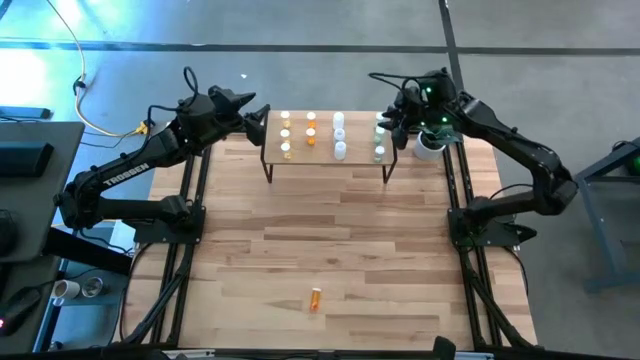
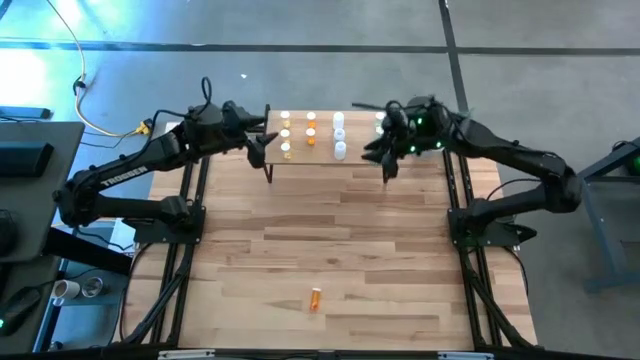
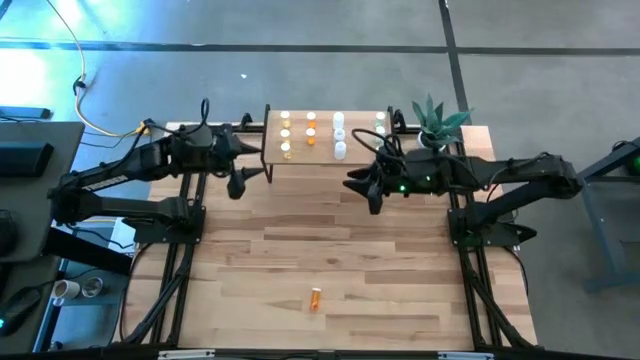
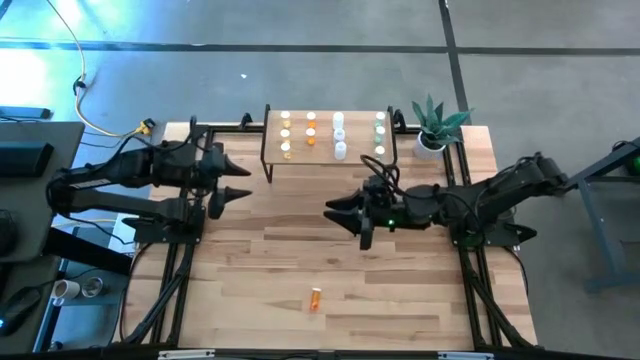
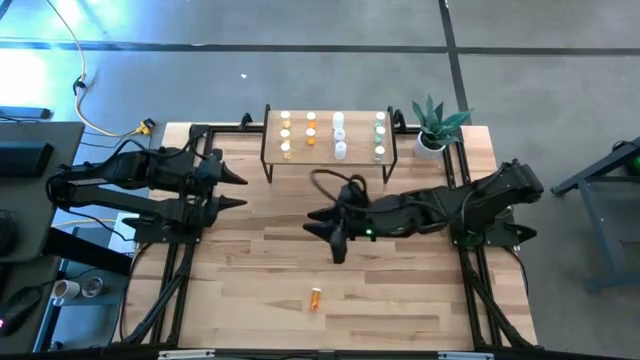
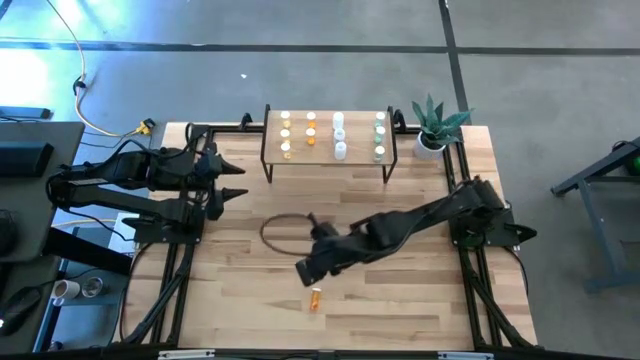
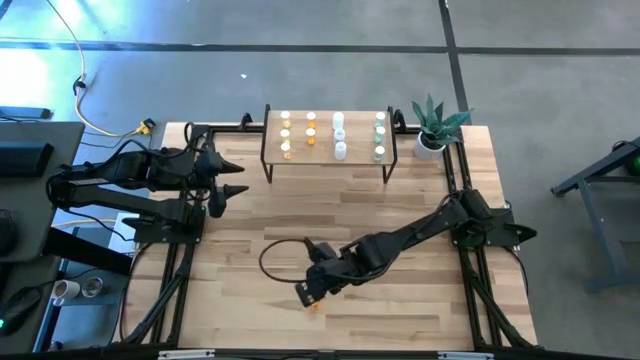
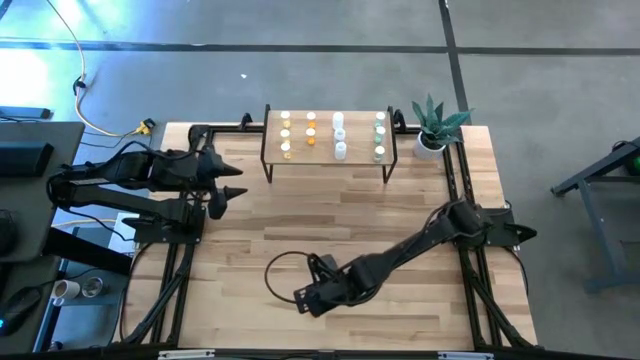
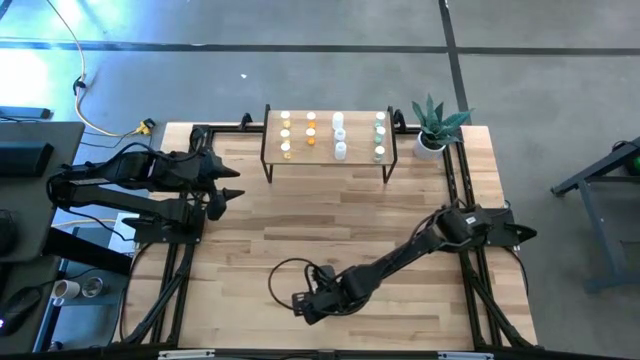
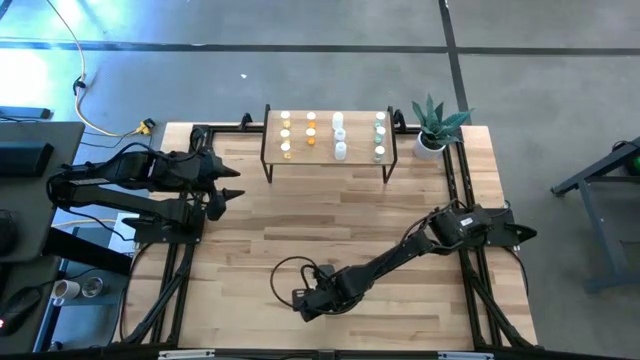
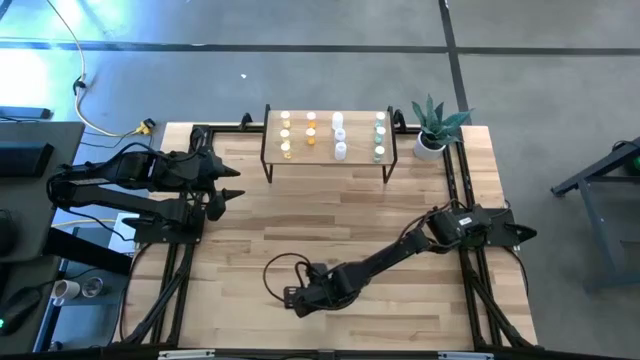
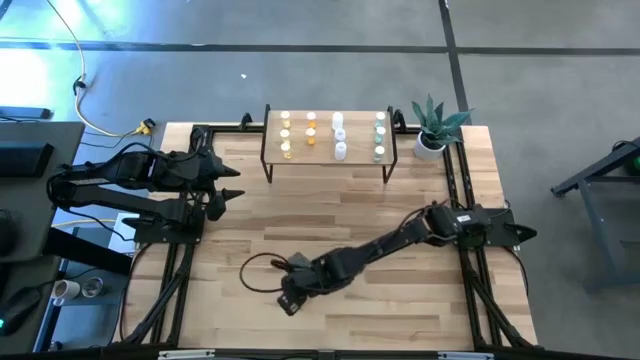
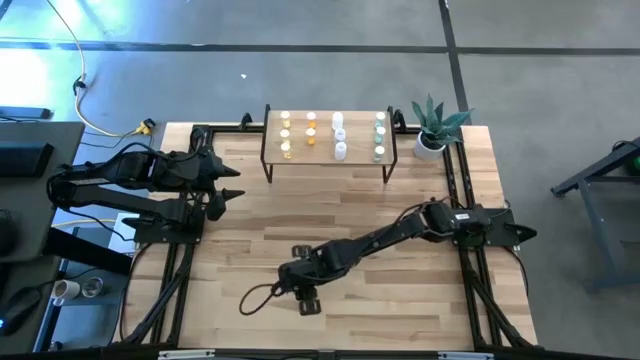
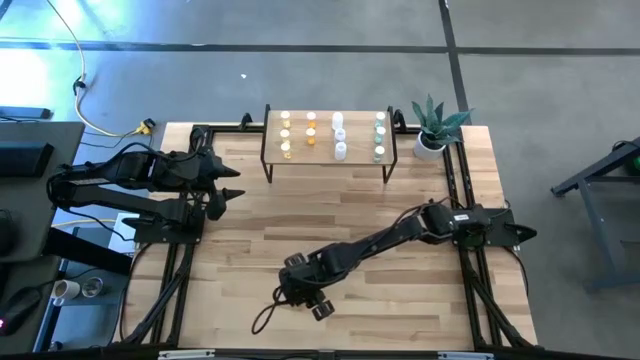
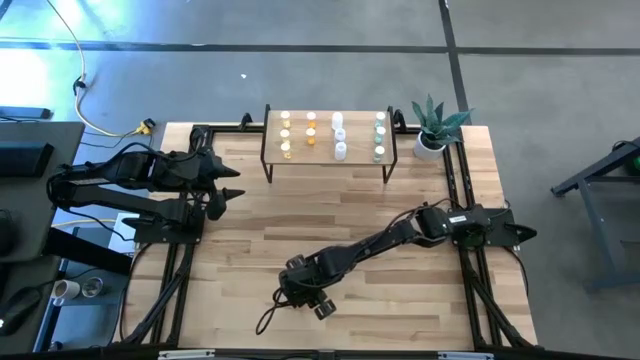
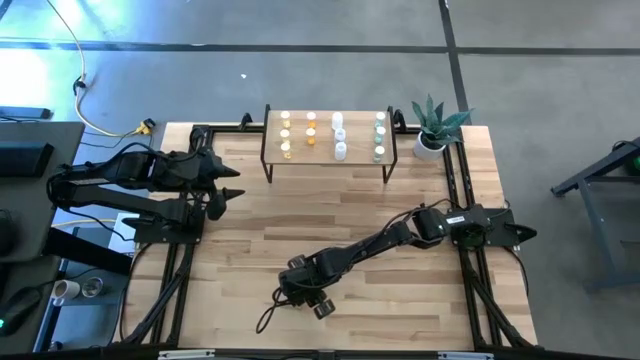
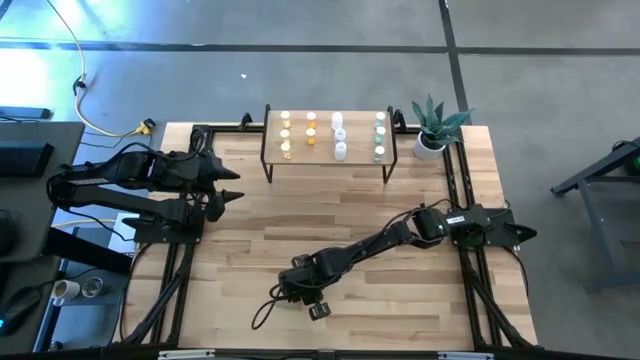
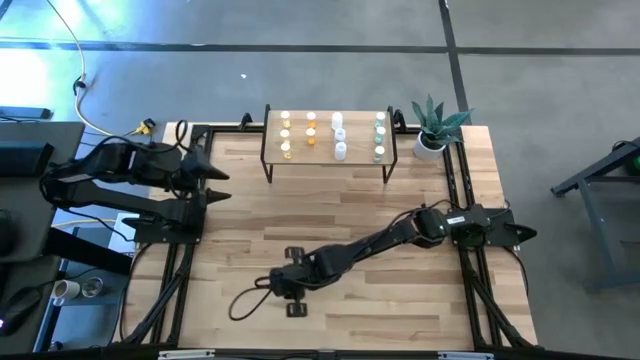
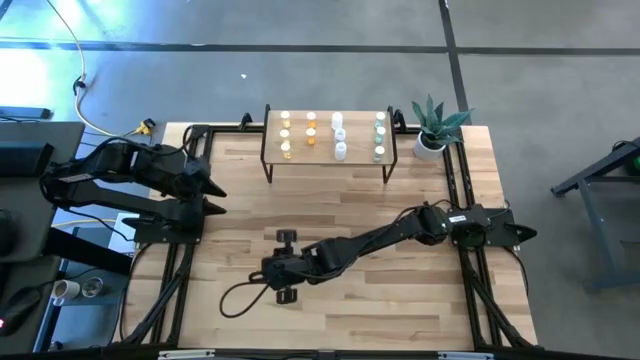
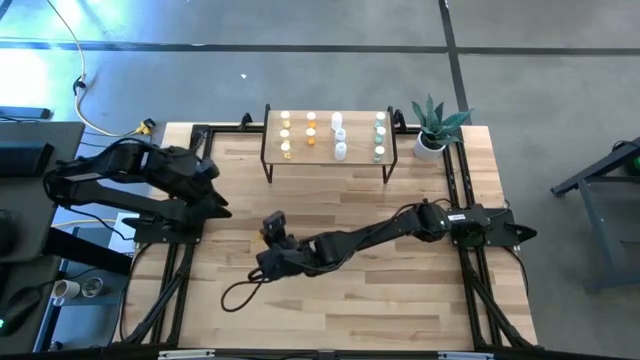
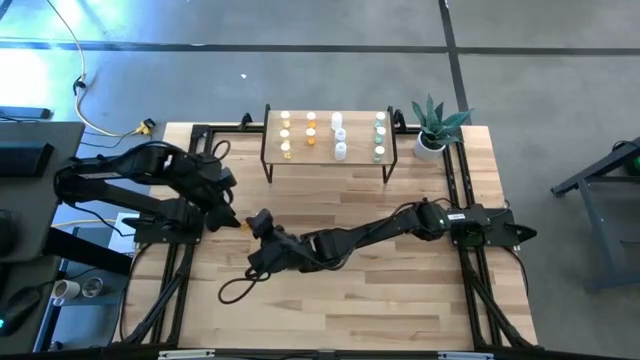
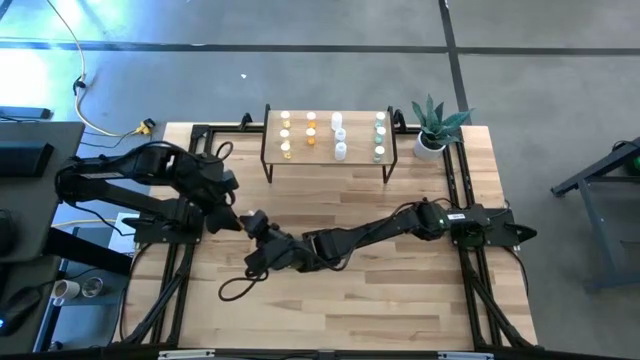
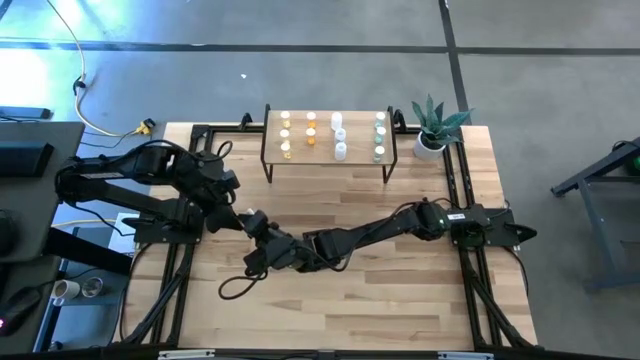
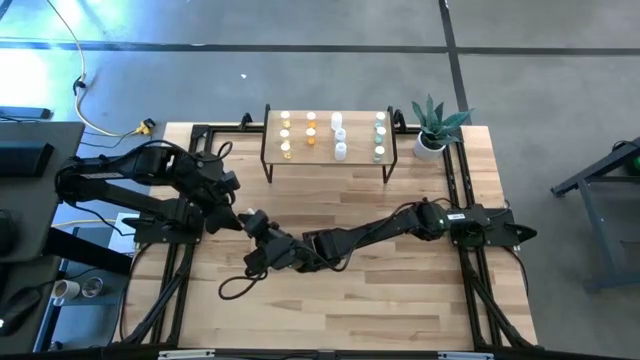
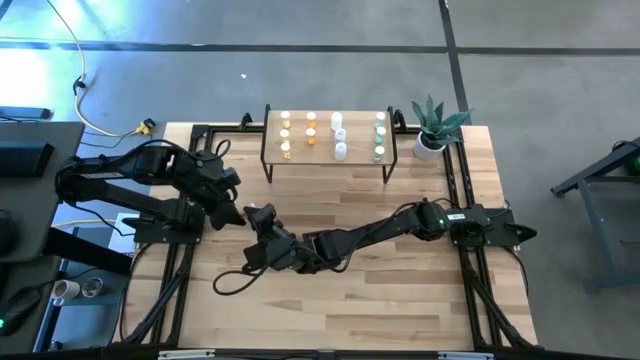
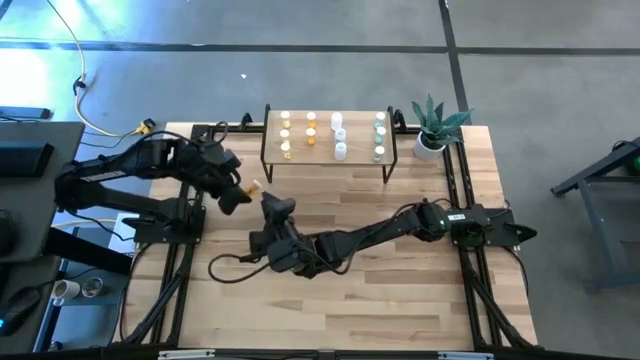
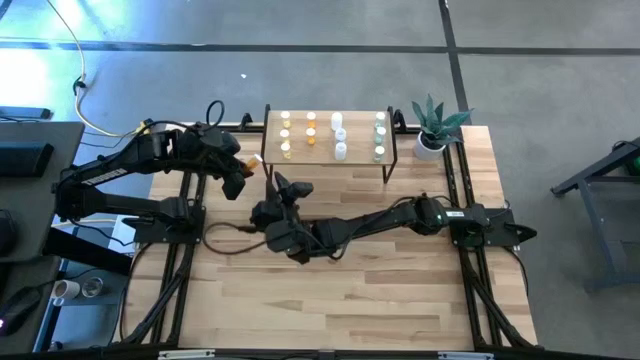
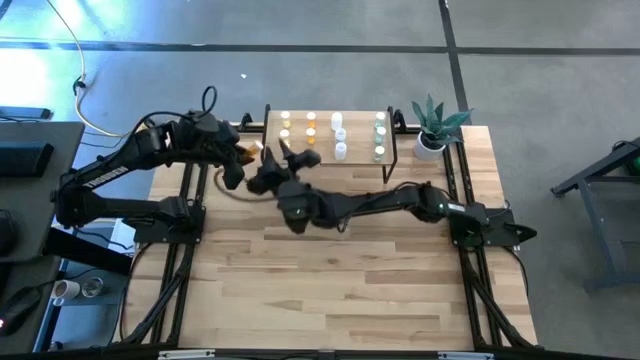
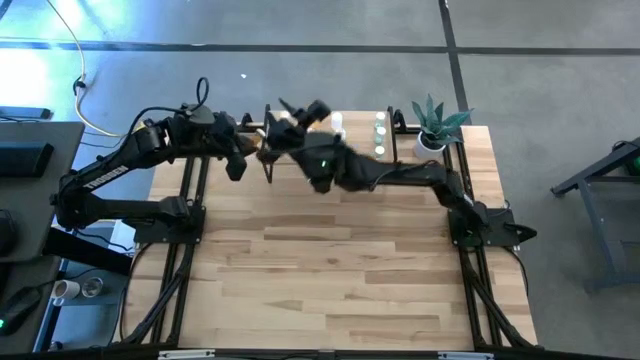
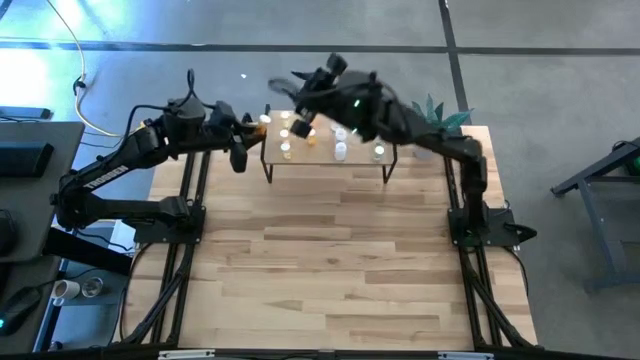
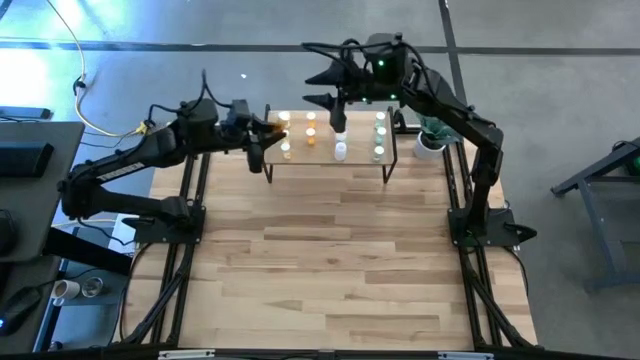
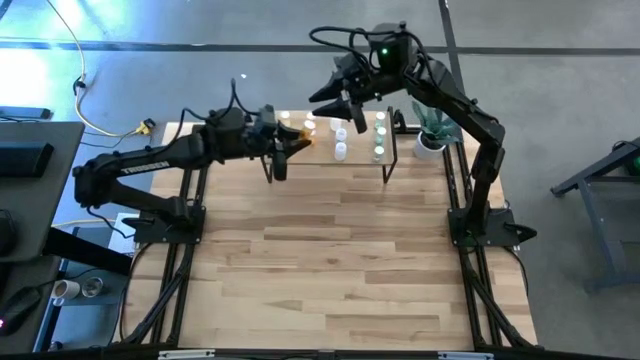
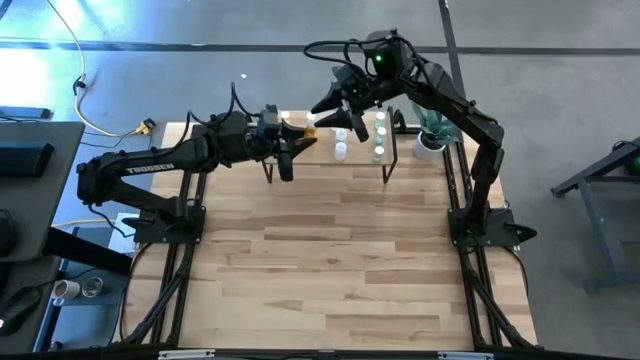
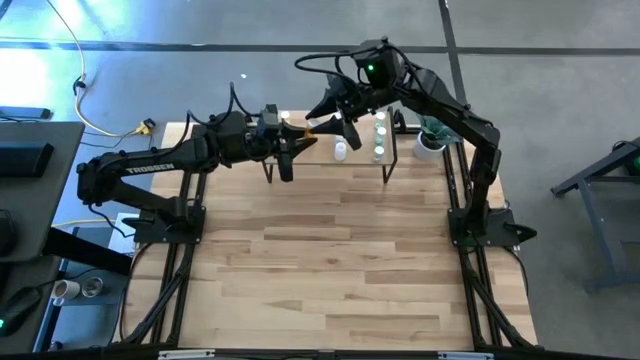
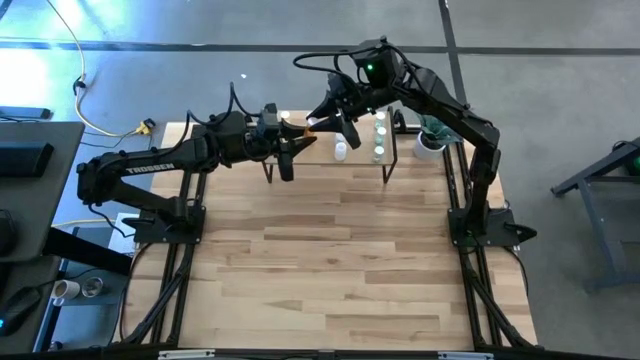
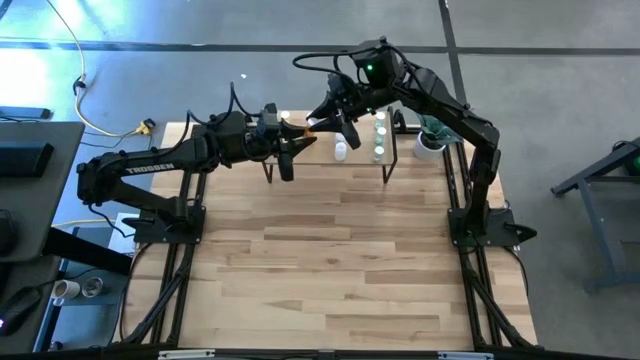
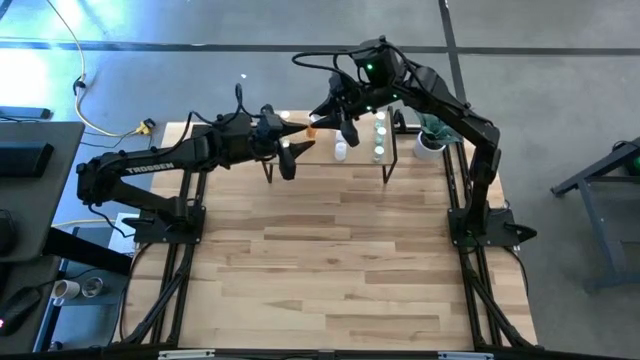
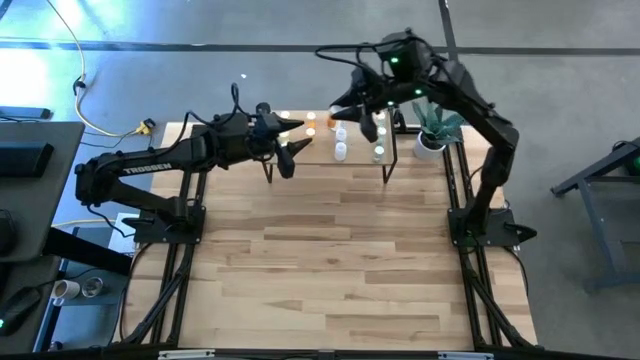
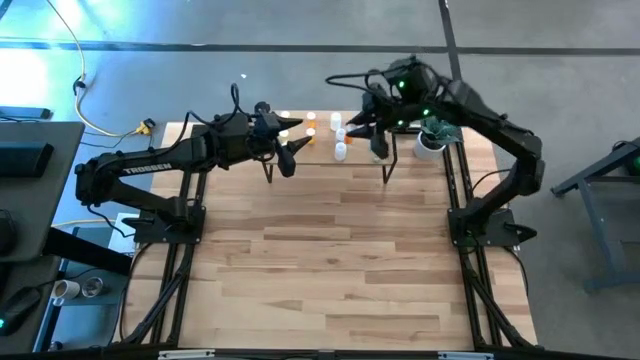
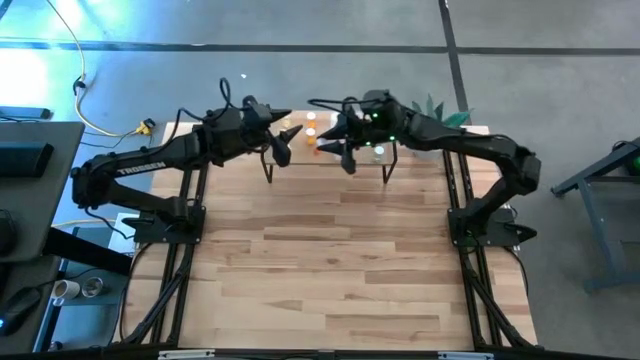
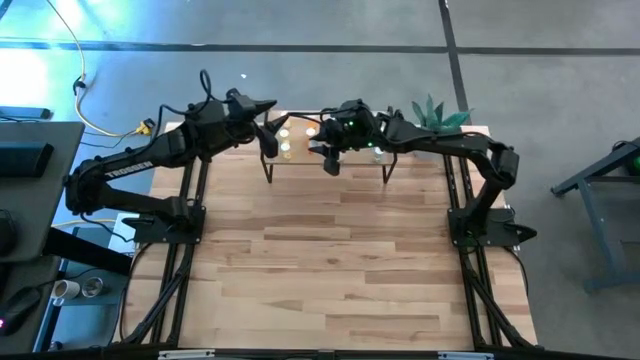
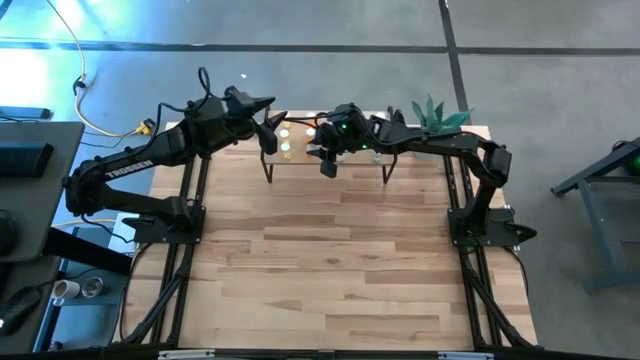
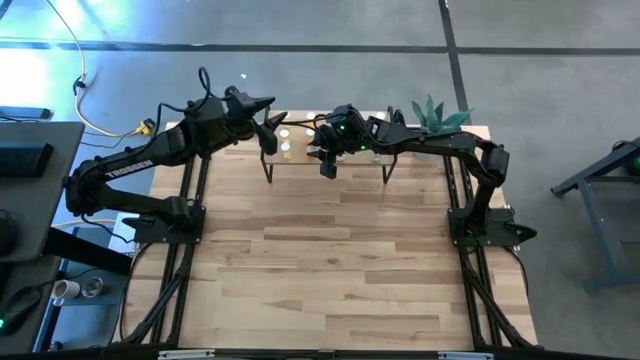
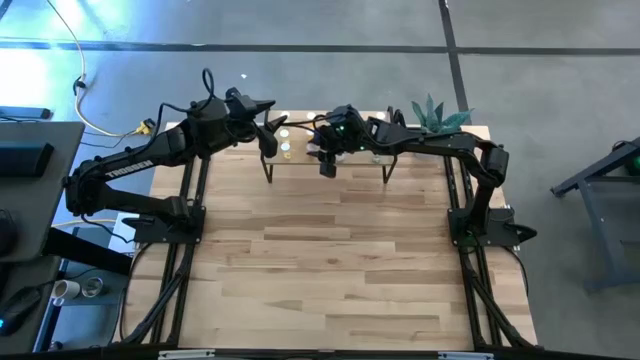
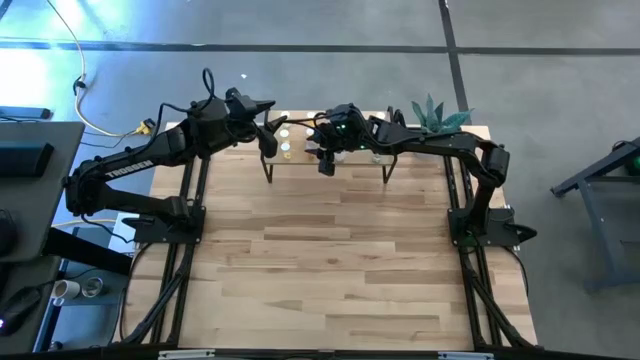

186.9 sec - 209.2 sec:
Task: Pick and place medicine bottles onto shelf by color
Put the orange pill bottle on the shelf and align it to the other orange pill bottle
